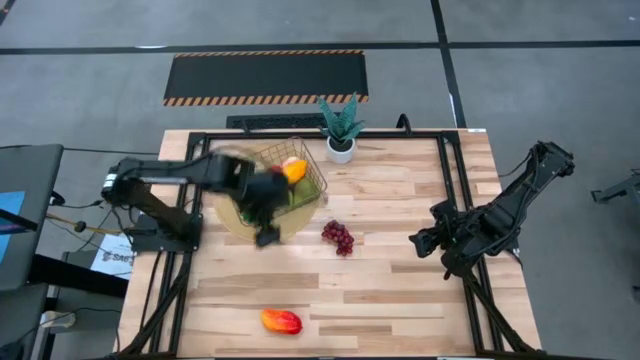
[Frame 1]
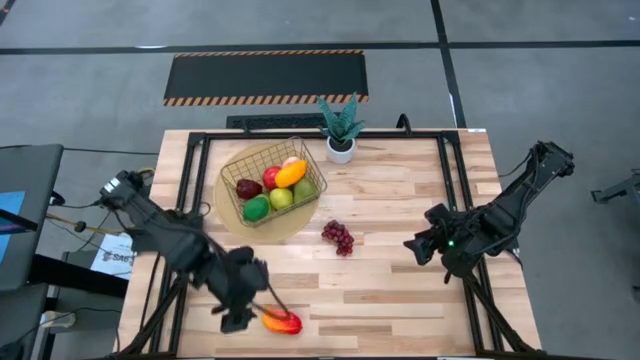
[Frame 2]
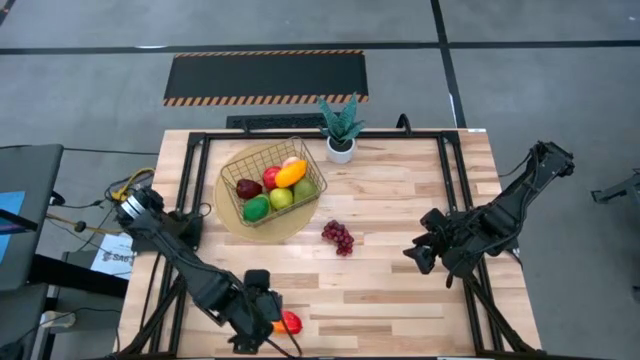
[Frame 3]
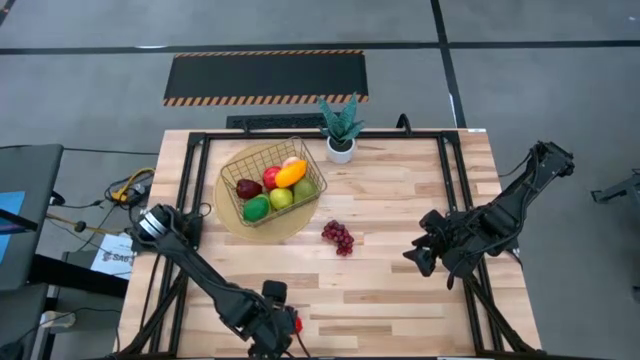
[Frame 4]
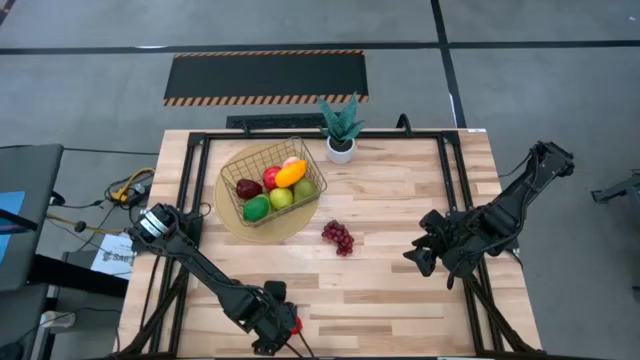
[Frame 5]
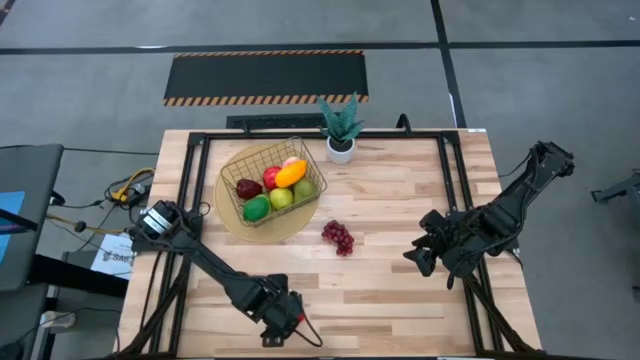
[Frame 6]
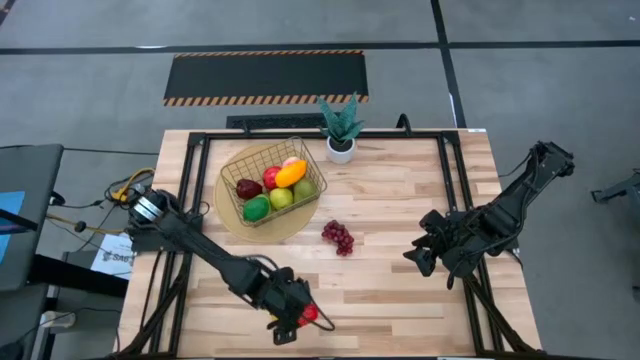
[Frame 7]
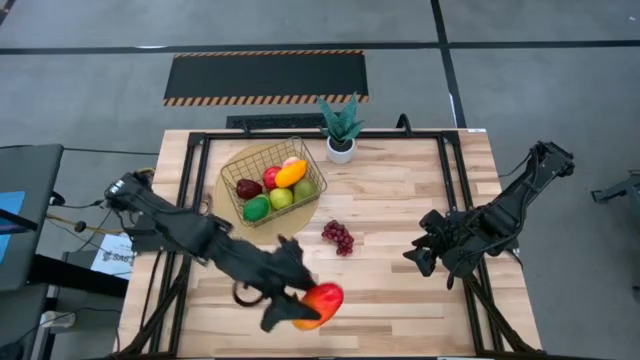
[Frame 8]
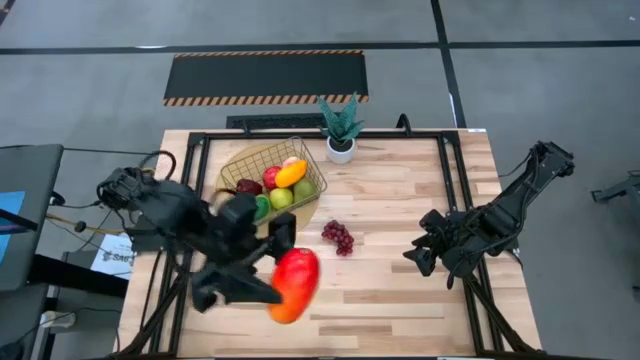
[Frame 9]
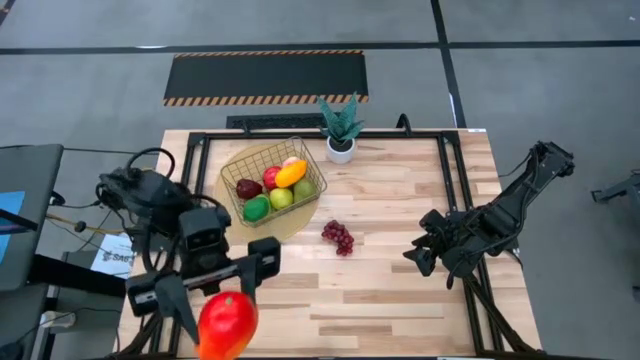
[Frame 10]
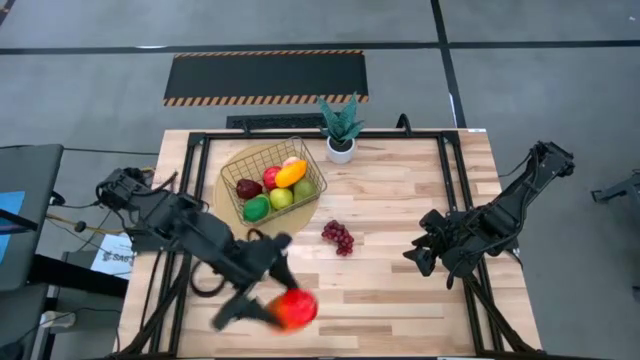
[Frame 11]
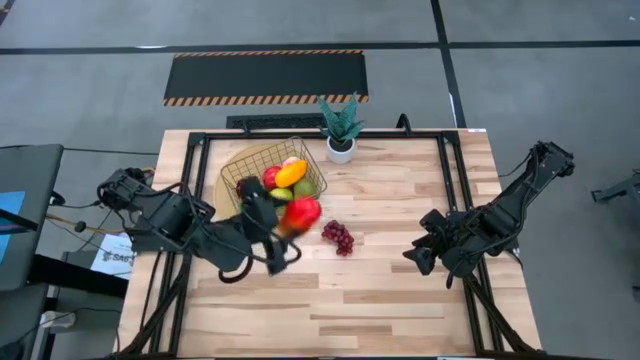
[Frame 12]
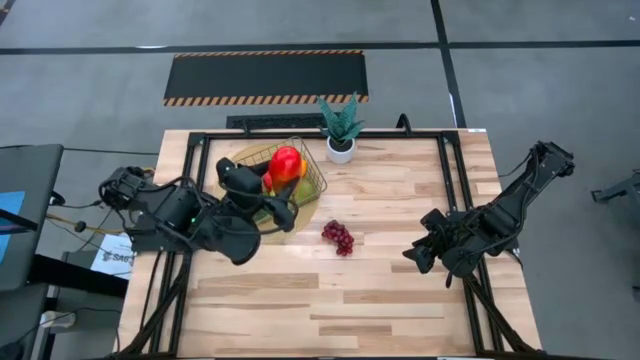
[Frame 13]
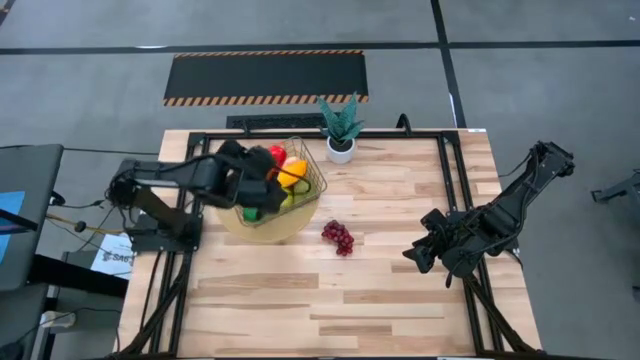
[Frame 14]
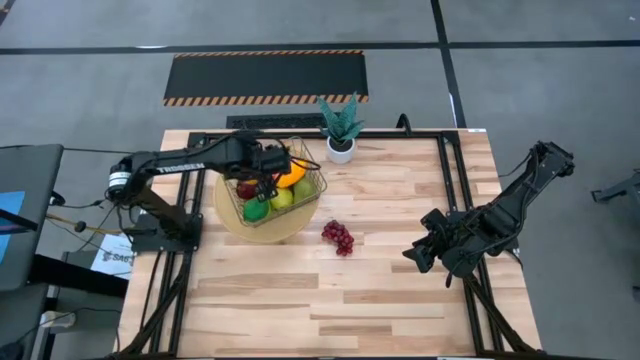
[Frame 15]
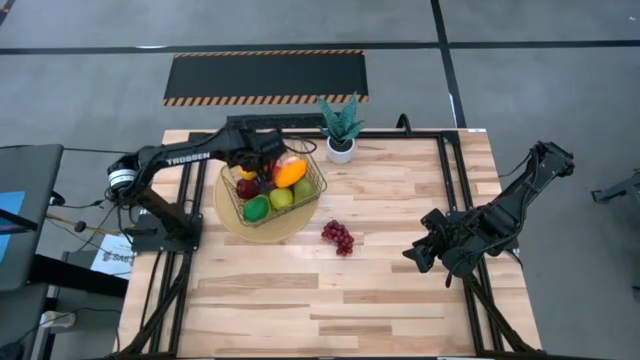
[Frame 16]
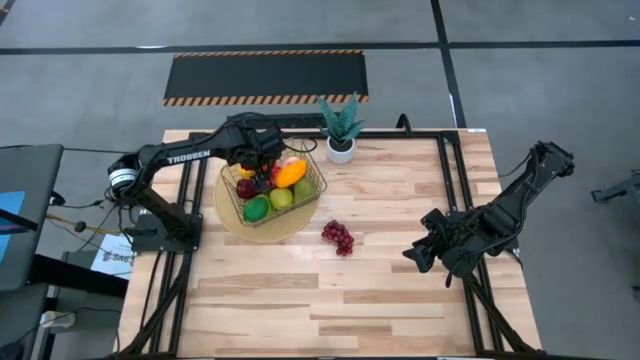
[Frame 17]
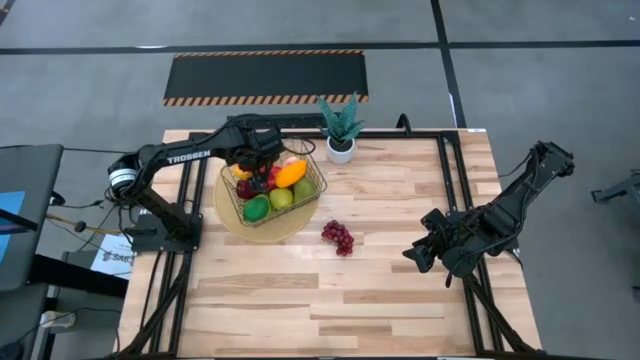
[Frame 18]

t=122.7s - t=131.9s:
Task: Build produce basket
Put the red mango into the wire basket

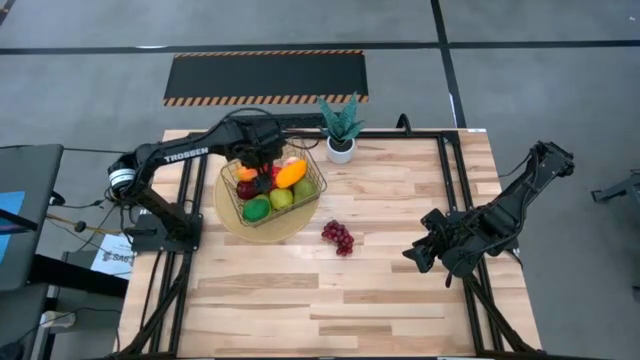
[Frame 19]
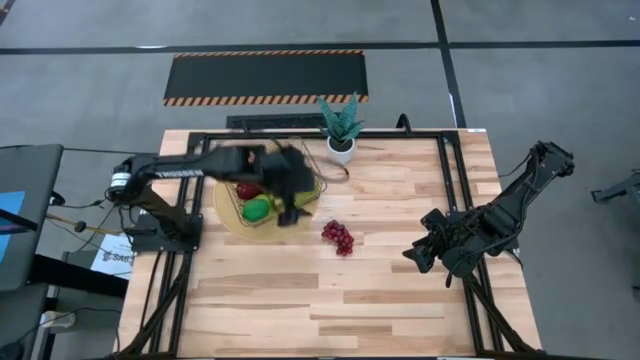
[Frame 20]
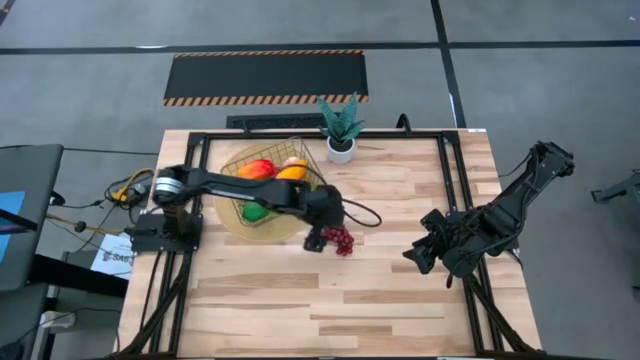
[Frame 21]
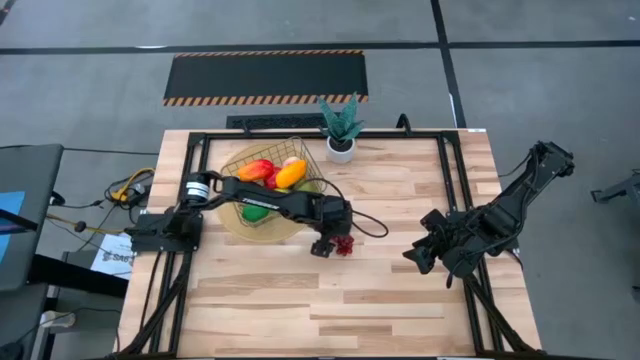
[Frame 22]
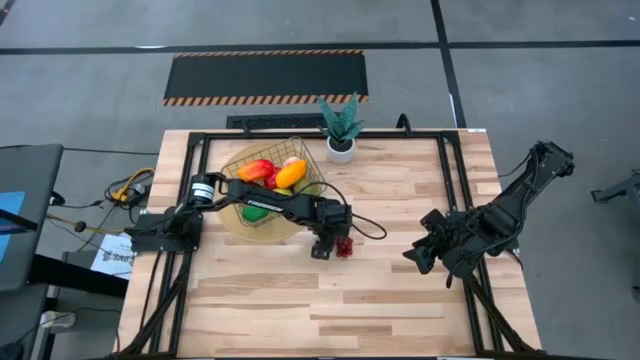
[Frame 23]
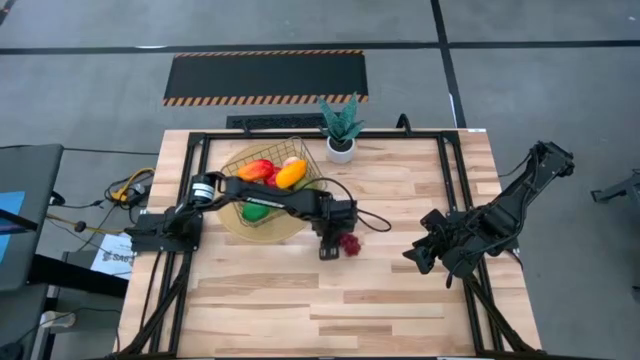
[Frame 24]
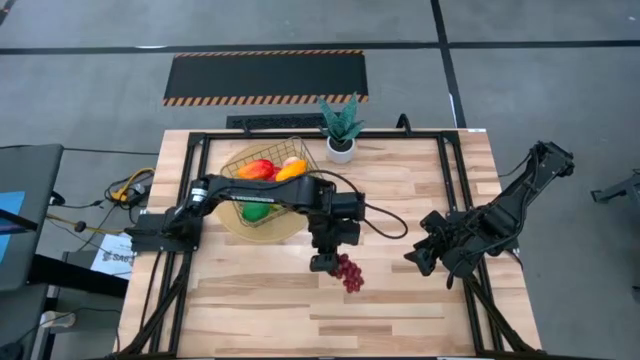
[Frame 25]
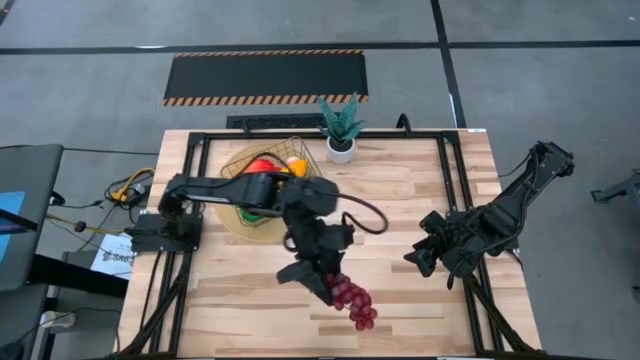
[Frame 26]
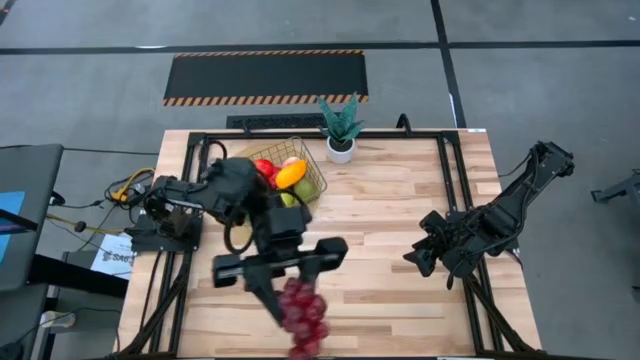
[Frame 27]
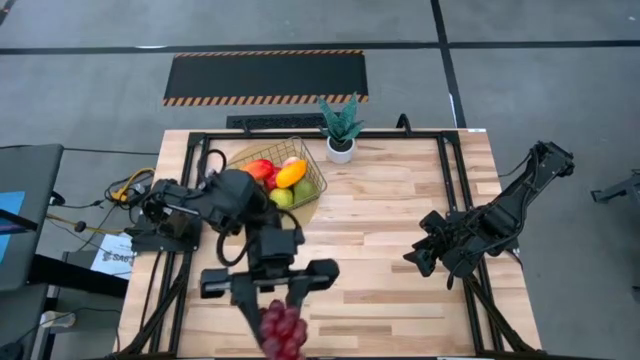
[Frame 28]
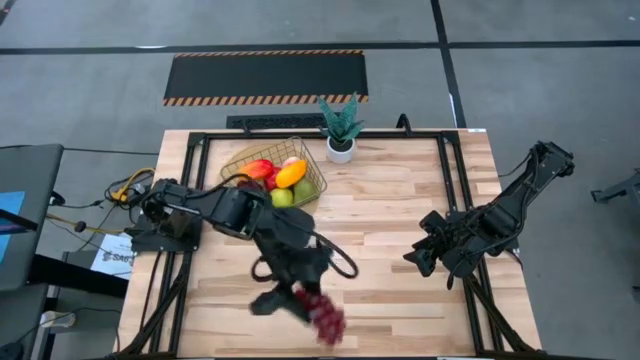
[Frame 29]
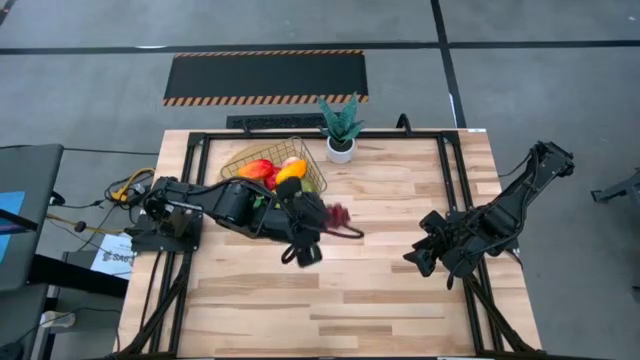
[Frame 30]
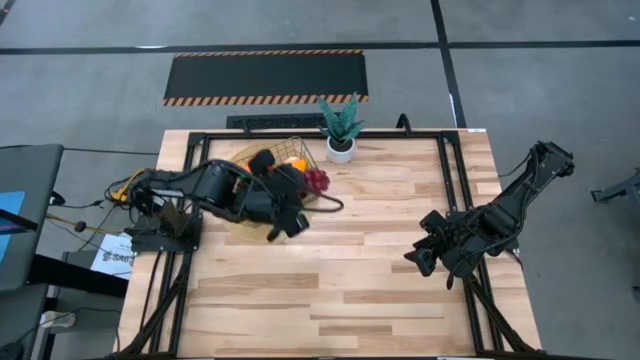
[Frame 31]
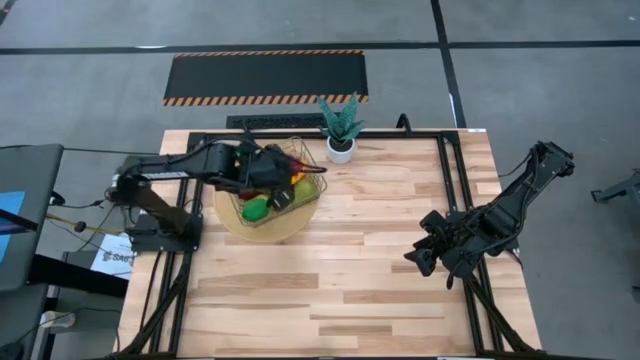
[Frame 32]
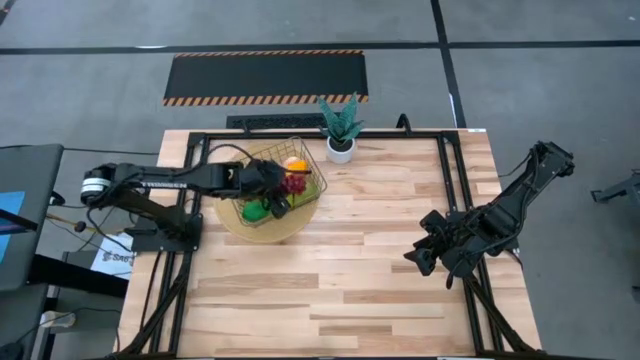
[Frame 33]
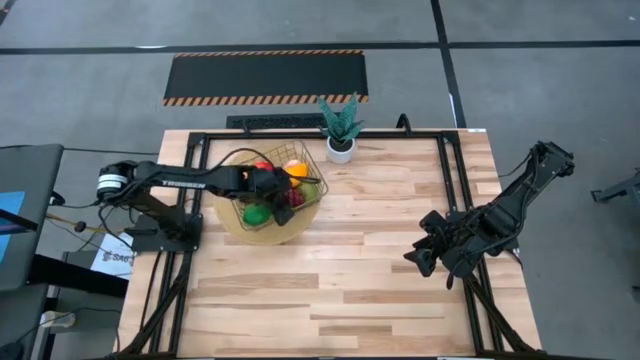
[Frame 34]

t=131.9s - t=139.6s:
Put the grapes into the wire basket

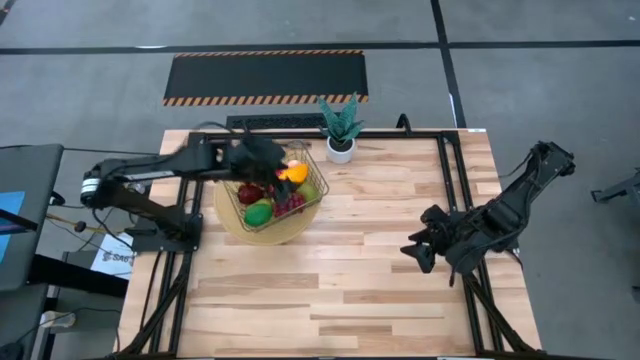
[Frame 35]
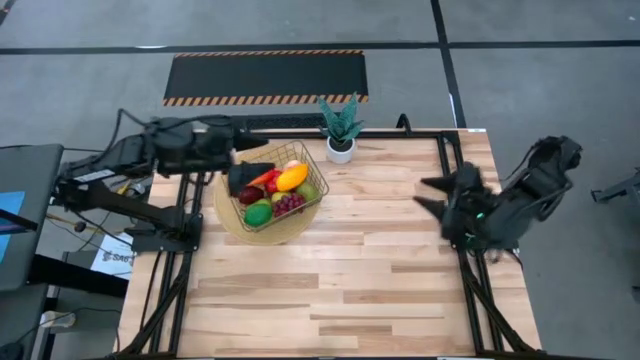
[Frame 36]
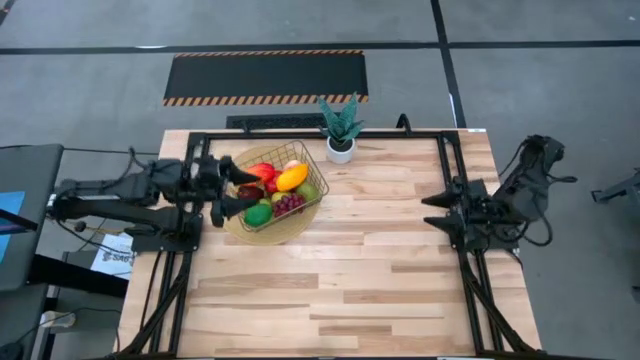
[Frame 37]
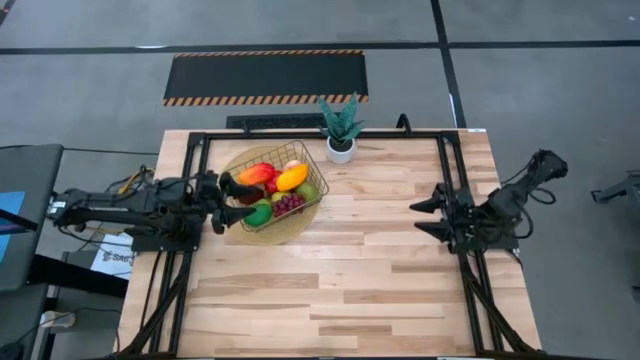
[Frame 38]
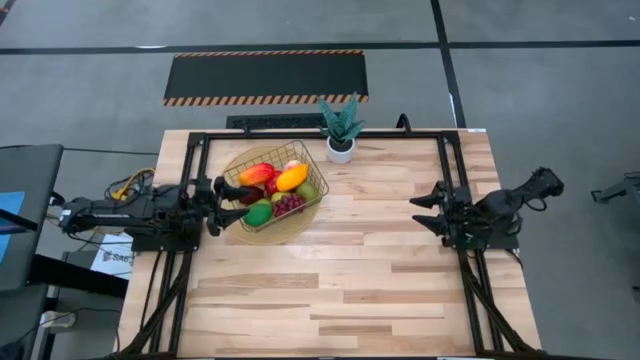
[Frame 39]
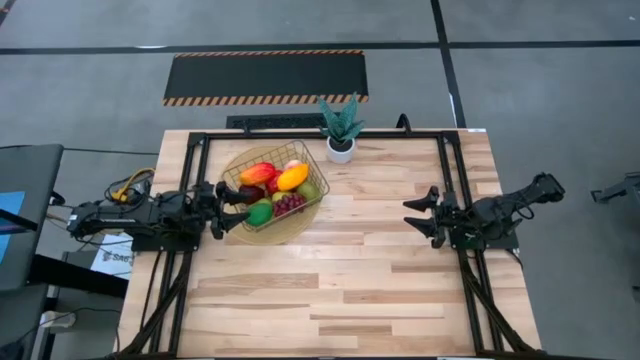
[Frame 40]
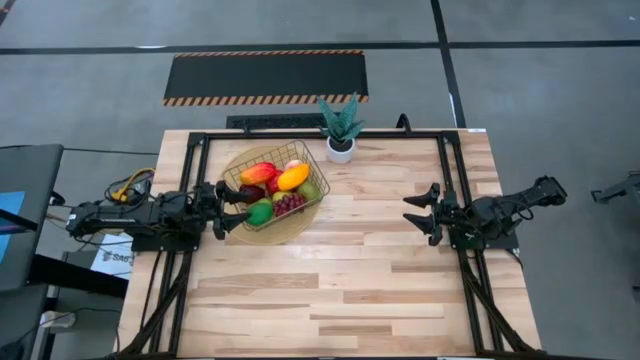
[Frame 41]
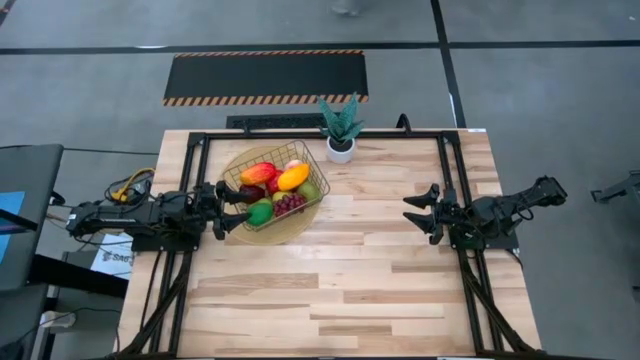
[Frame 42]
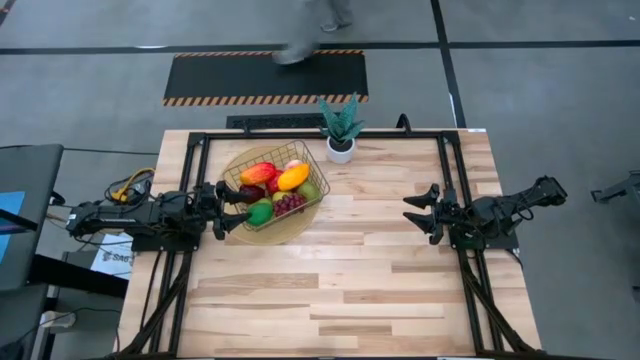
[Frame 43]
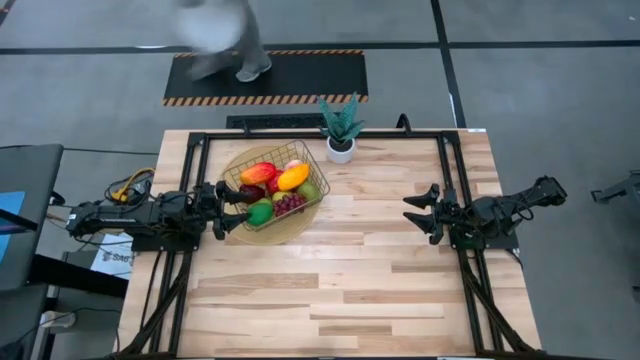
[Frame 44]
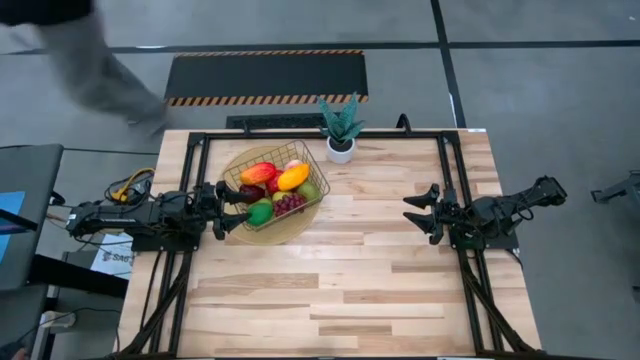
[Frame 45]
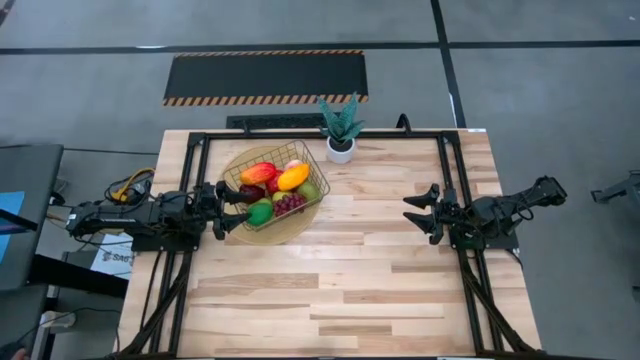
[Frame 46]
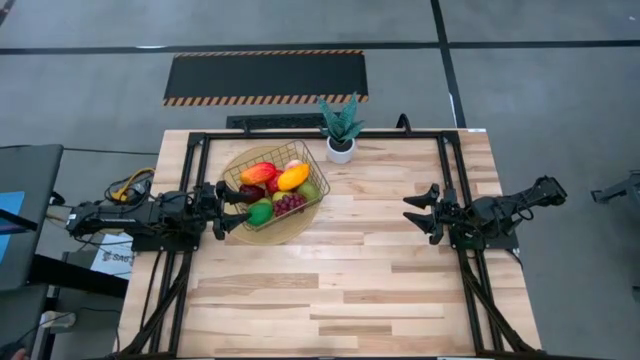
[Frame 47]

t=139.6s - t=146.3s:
Return to Home Position
